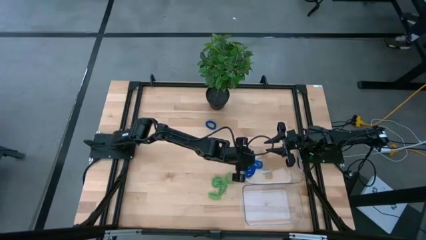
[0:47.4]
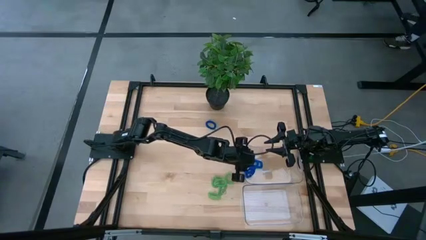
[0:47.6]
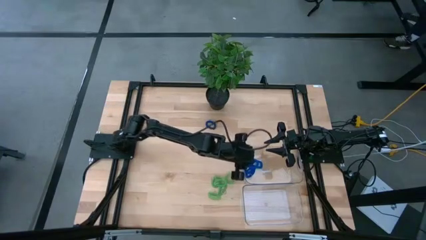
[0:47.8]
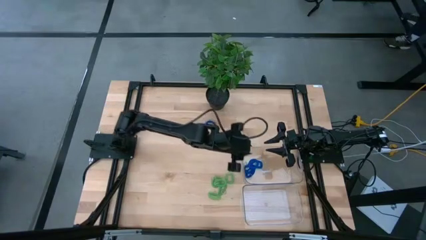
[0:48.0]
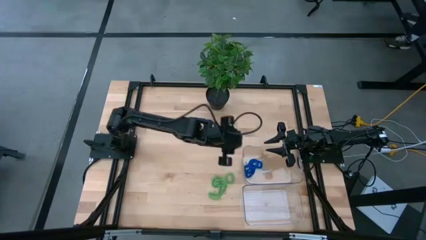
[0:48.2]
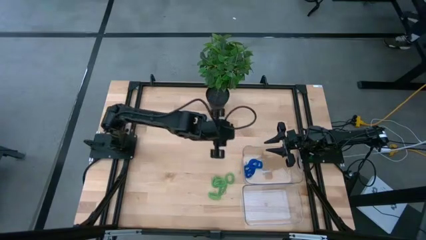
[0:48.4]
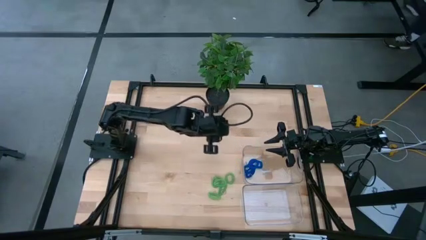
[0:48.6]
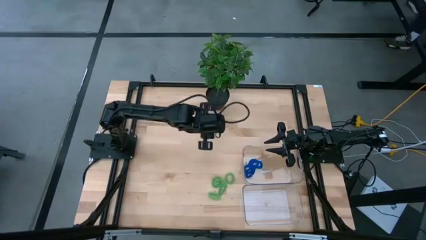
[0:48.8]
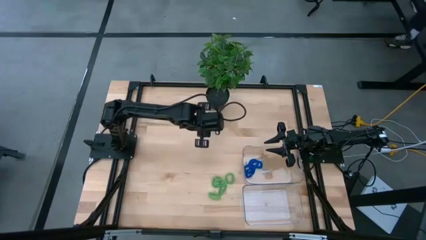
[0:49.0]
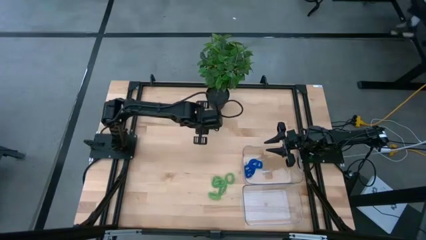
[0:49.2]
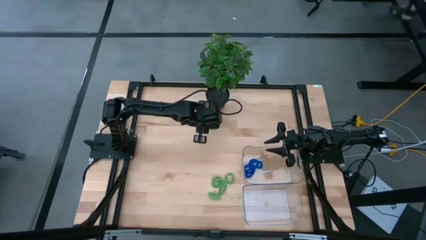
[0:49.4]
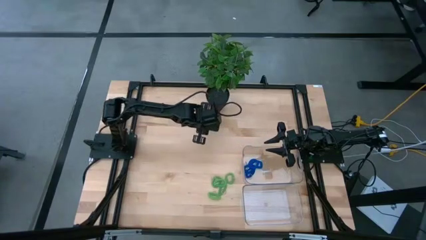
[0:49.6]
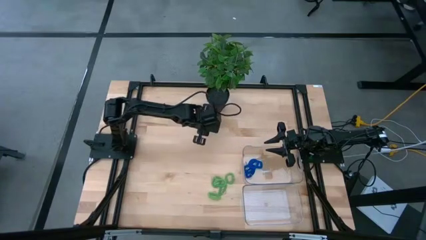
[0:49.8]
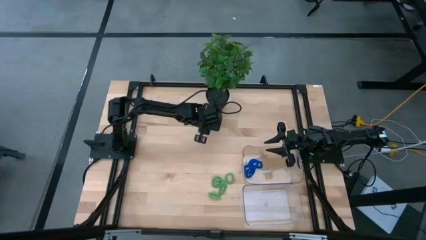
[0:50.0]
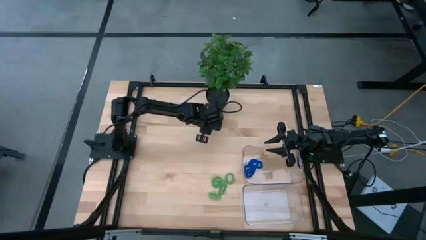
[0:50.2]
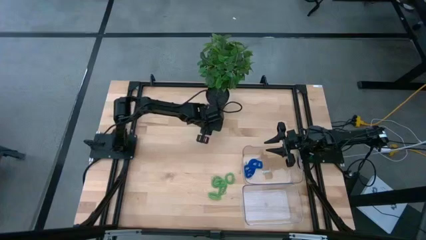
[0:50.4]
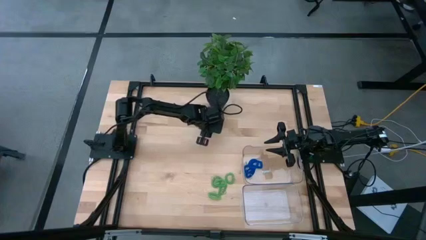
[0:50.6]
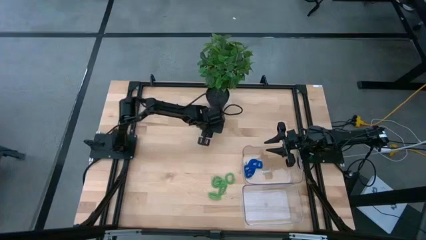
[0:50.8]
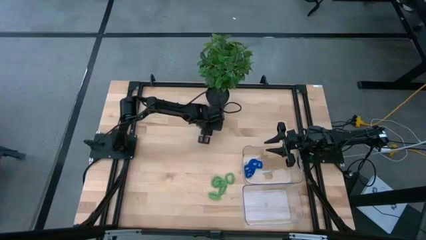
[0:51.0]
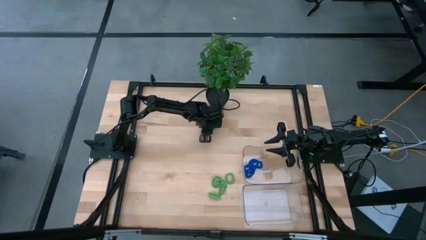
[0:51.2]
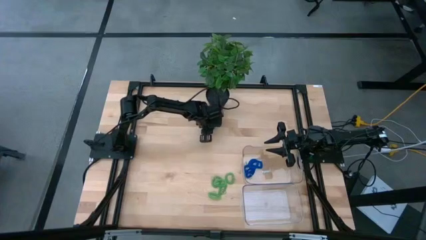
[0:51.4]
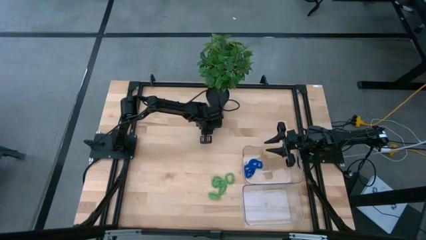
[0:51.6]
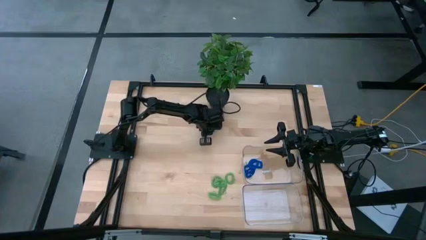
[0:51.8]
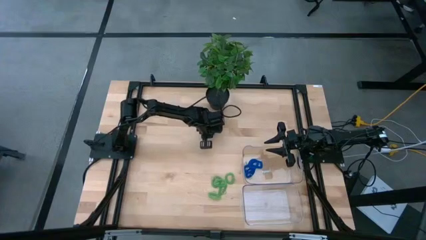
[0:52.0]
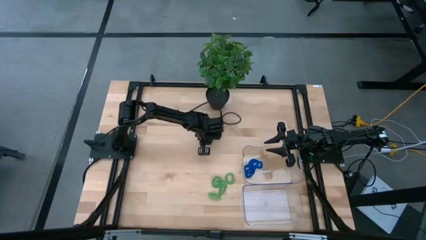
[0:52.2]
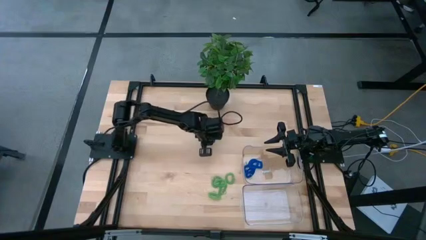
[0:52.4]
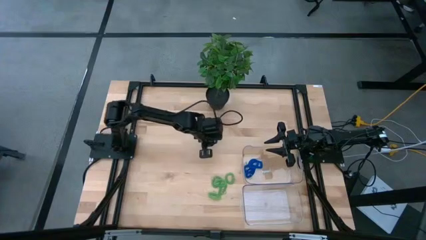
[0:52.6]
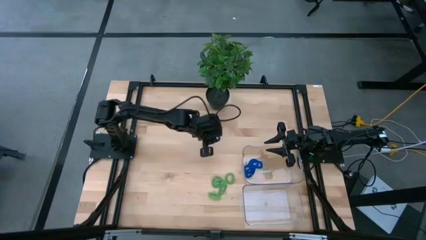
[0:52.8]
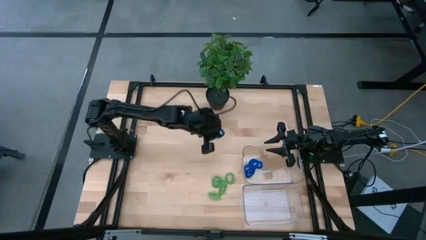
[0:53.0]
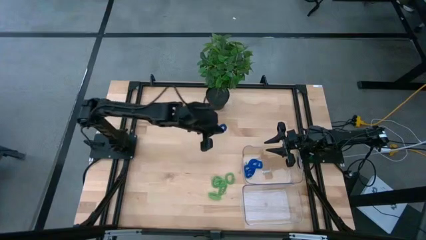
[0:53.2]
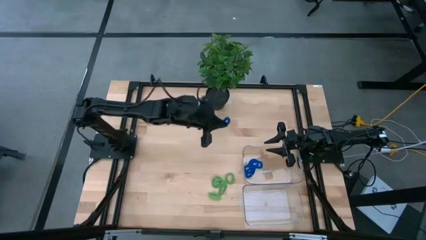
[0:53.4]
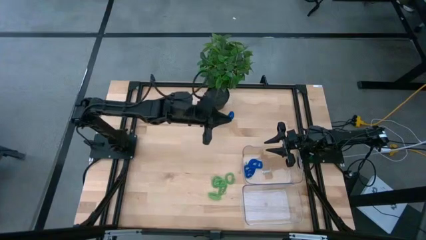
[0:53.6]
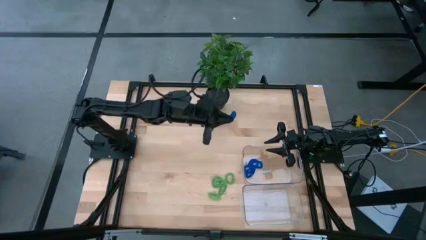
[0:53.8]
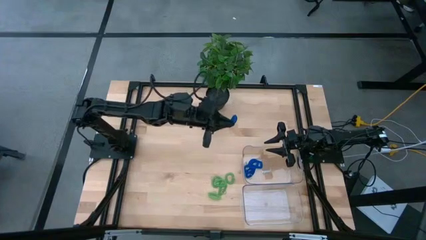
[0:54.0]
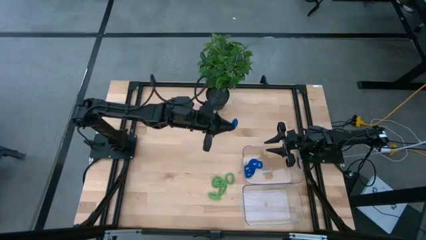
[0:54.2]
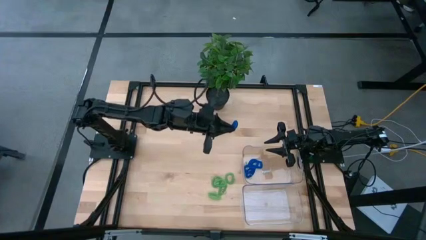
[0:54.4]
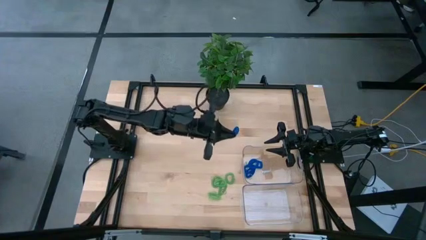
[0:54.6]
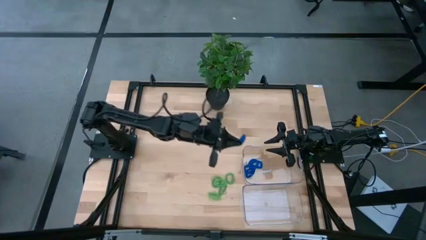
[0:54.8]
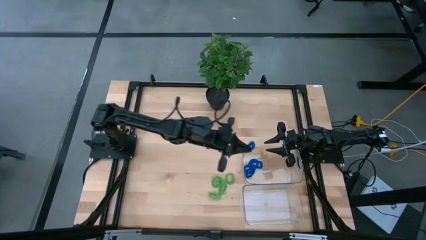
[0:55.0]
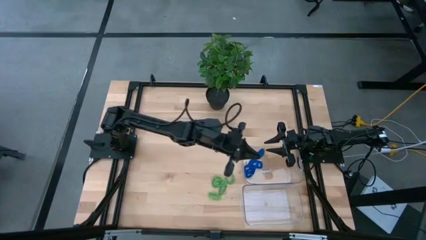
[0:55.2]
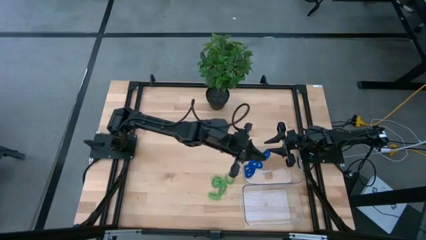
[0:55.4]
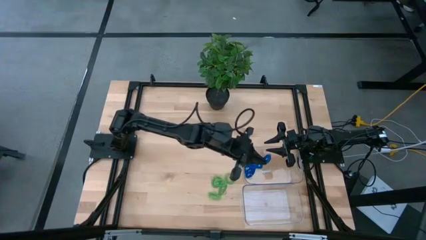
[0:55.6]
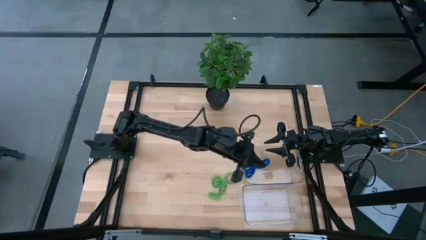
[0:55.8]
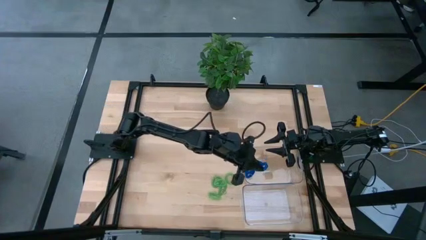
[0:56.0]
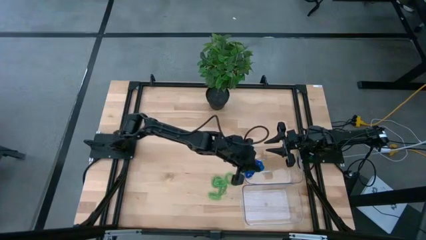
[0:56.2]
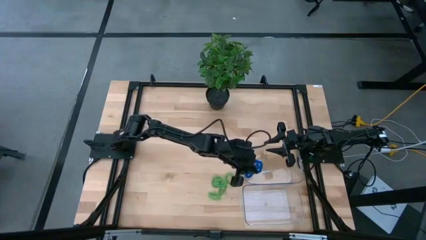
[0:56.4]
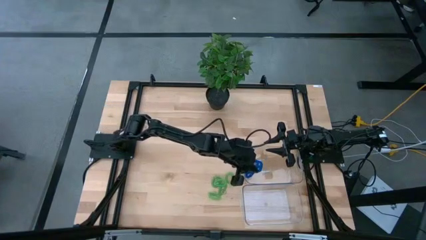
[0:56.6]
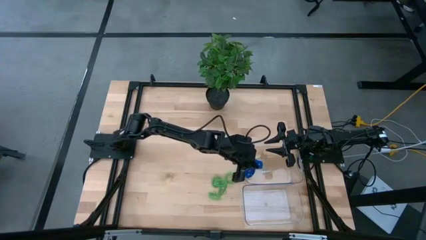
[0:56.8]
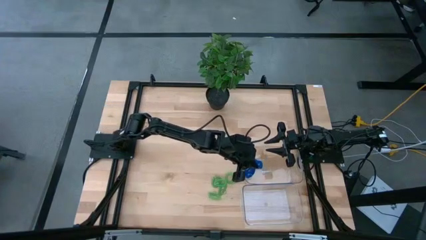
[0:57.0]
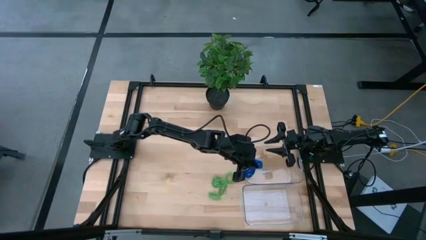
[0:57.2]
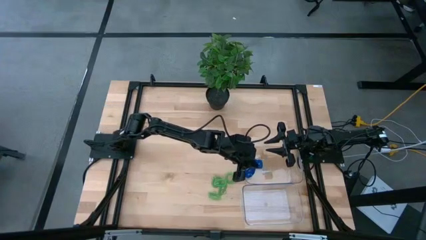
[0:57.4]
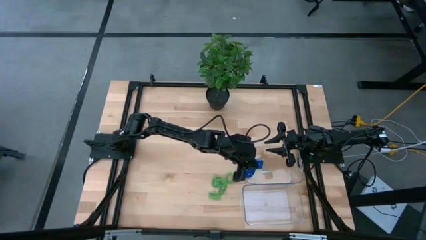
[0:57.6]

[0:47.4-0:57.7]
Task: Sort spring keychains
Put the blue spring keychain in the top transparent bin
